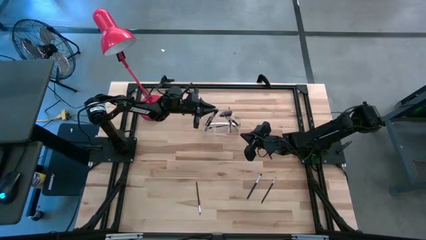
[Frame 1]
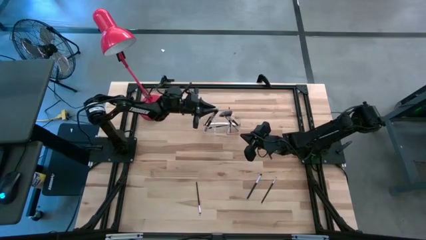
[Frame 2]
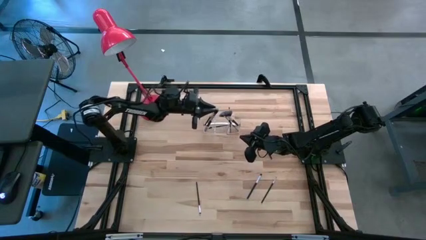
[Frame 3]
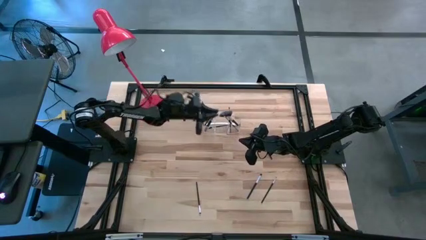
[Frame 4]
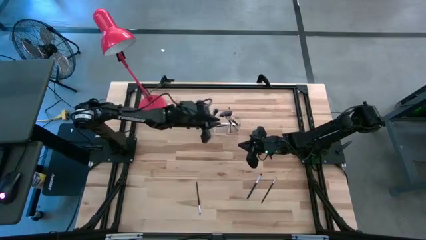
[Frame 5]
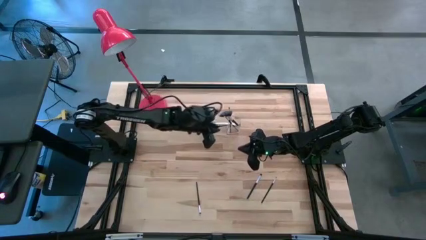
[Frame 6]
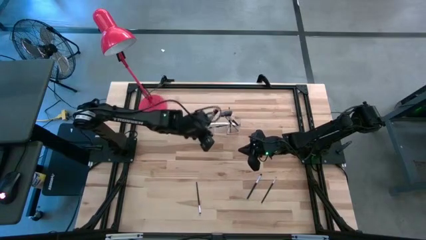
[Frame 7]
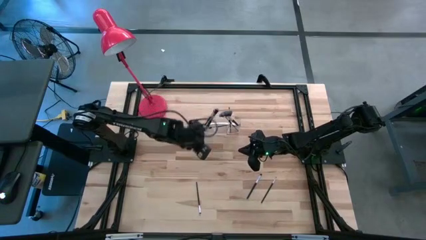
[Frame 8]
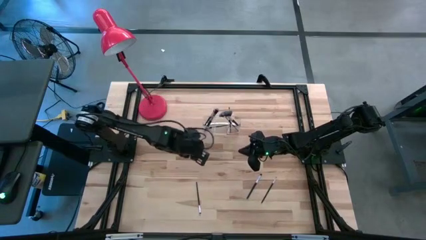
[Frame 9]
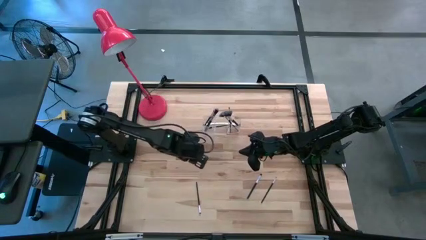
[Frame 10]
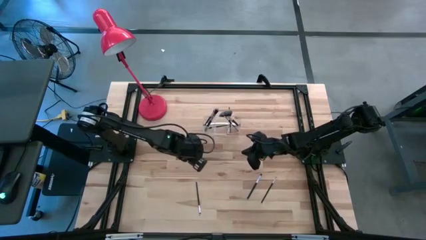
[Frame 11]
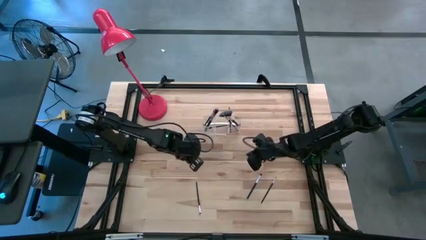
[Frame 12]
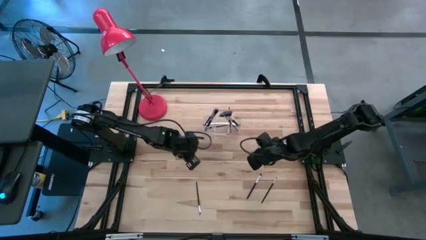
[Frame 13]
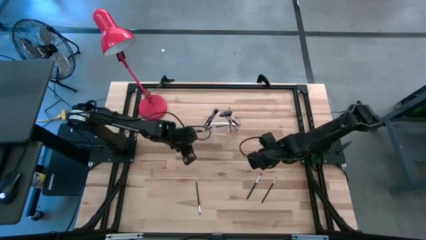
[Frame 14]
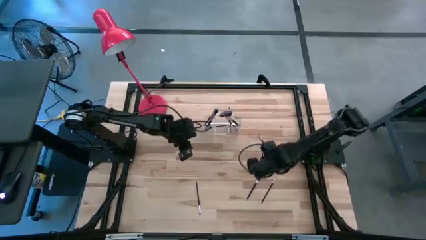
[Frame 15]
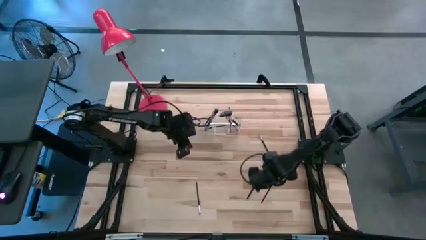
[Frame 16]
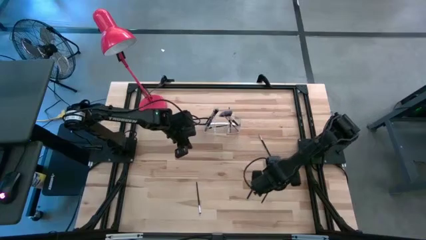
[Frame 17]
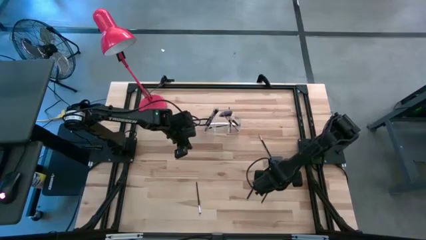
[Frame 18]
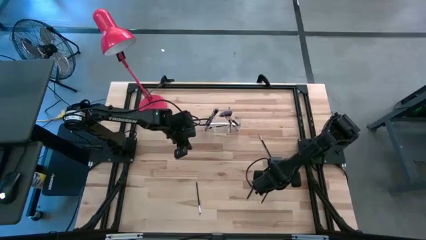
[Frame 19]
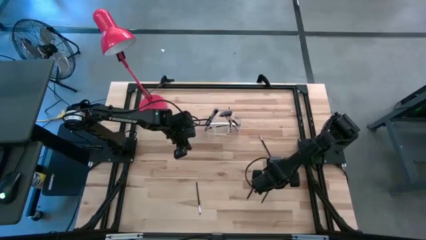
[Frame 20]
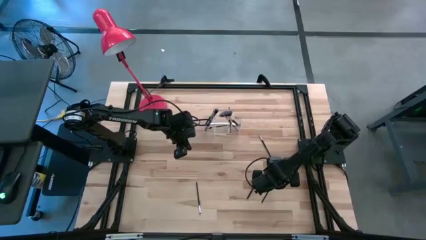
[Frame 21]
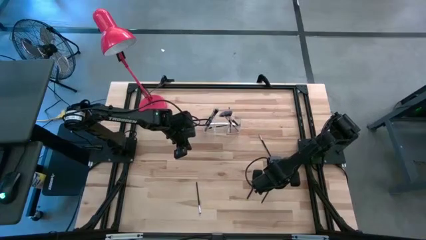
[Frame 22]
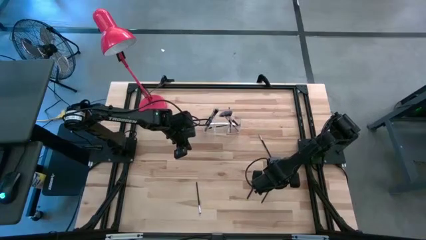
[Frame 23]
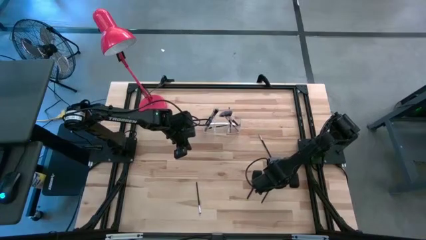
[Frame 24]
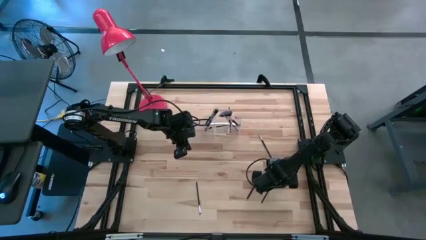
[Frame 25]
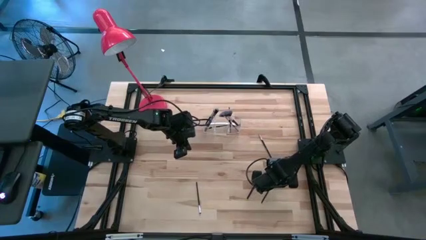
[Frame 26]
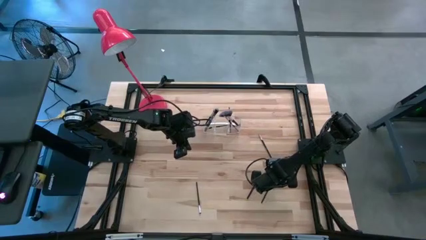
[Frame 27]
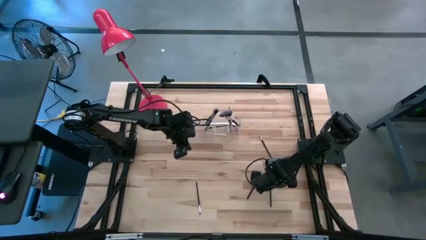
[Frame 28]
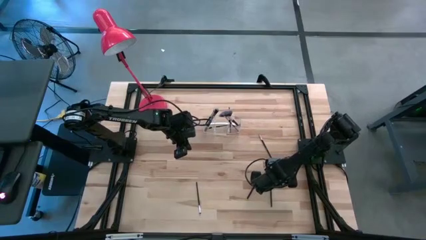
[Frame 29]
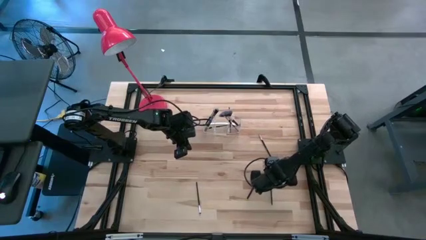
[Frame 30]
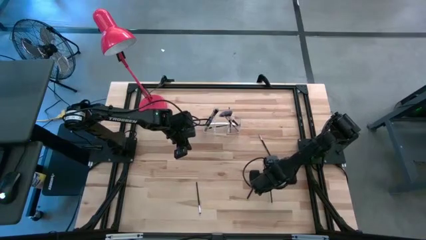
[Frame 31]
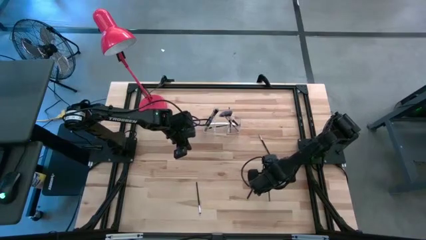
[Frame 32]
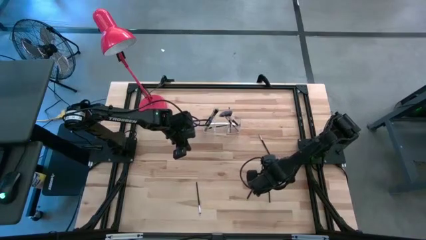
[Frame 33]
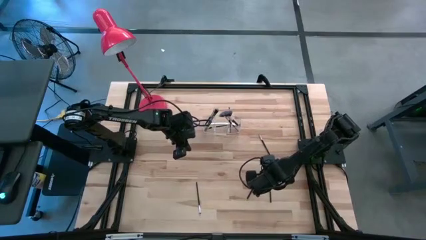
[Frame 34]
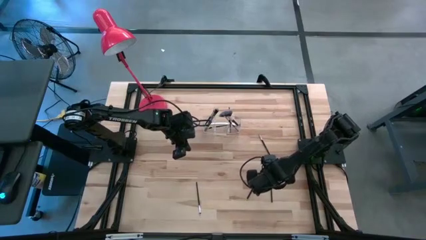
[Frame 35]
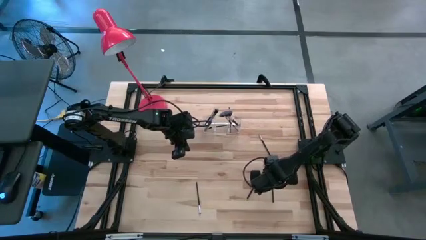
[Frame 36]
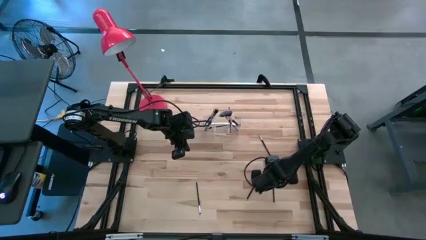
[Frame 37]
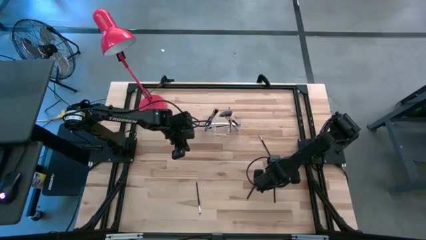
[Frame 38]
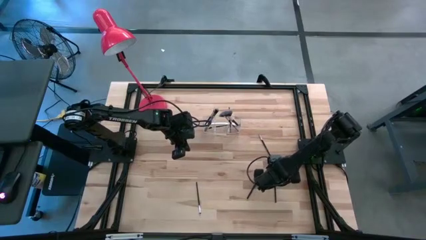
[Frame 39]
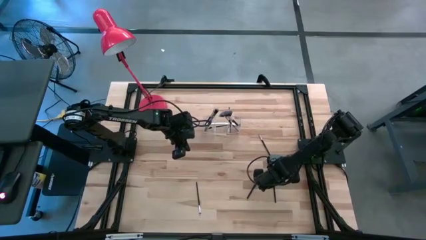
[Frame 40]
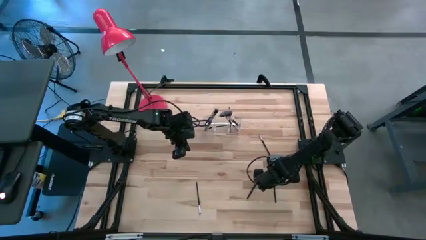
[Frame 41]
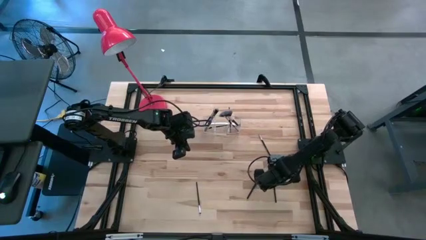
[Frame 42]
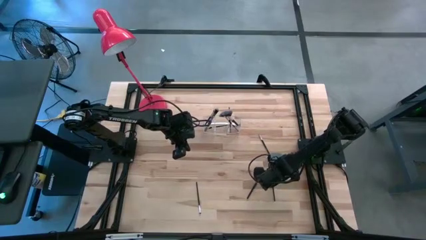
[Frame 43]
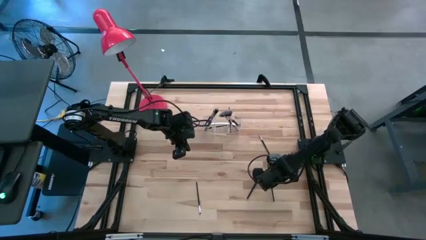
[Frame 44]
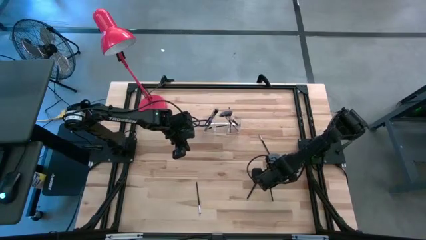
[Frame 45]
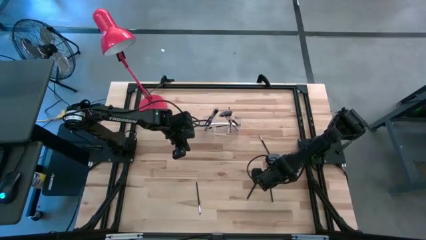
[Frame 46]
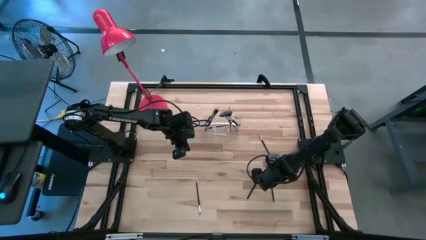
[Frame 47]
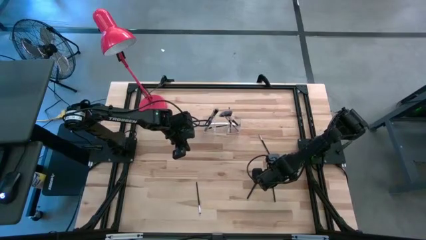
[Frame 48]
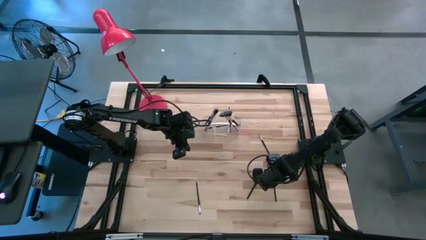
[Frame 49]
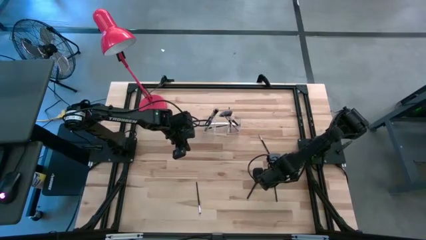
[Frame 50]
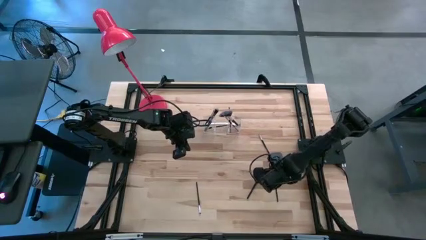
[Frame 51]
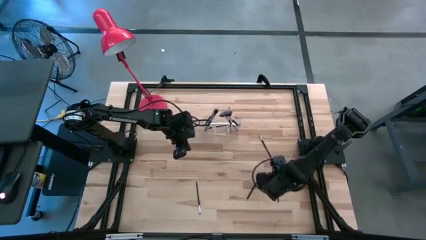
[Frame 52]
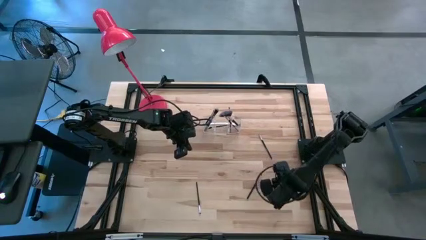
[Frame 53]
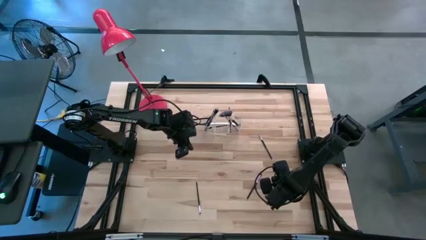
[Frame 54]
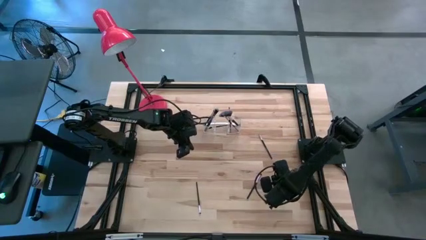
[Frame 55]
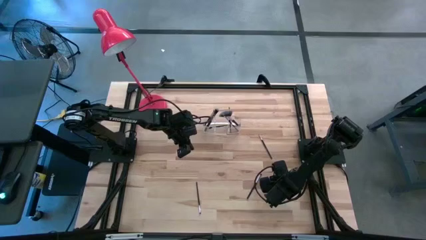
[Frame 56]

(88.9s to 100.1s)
Task: Pick & Place Makeup Supplies
Put the makeup brush into the transparent organizer

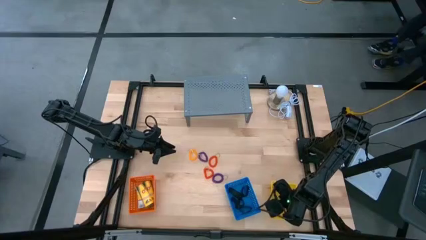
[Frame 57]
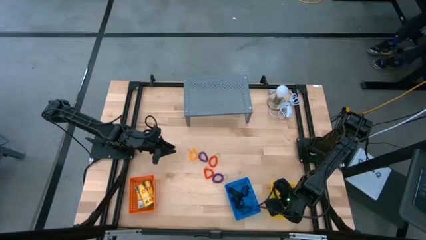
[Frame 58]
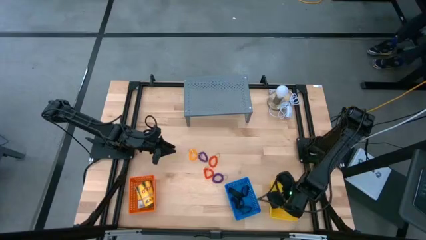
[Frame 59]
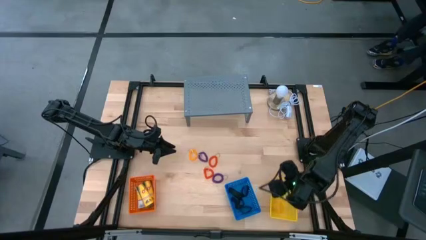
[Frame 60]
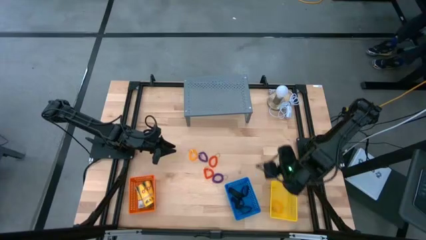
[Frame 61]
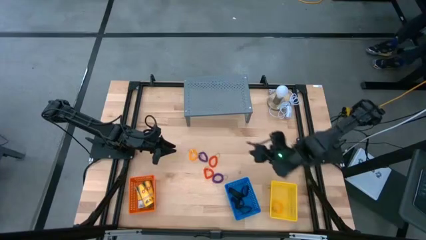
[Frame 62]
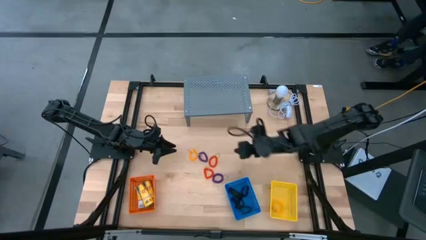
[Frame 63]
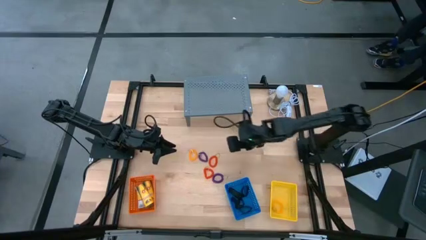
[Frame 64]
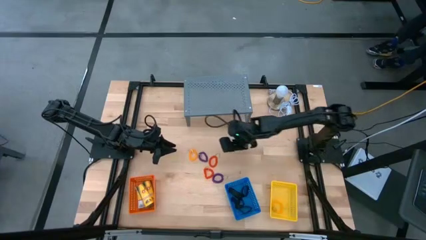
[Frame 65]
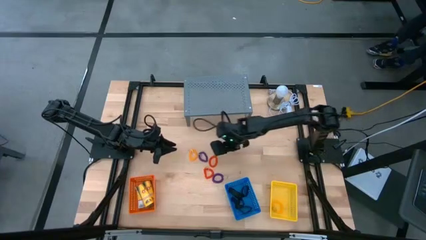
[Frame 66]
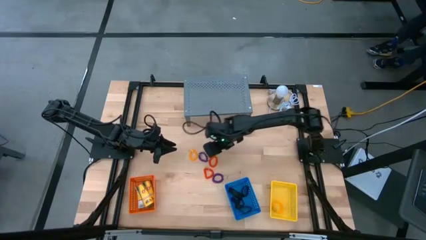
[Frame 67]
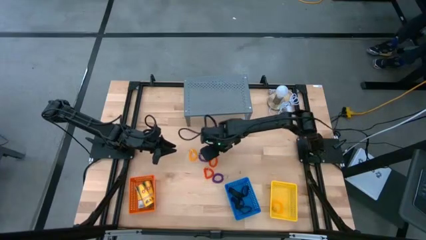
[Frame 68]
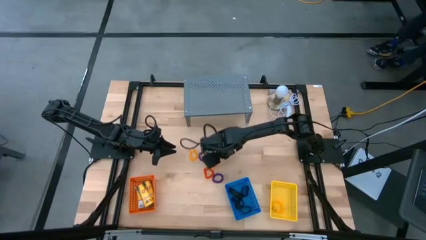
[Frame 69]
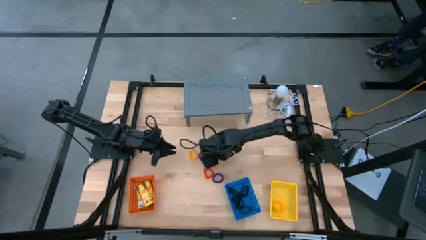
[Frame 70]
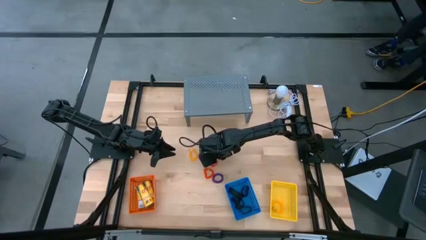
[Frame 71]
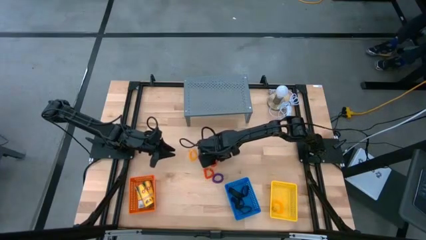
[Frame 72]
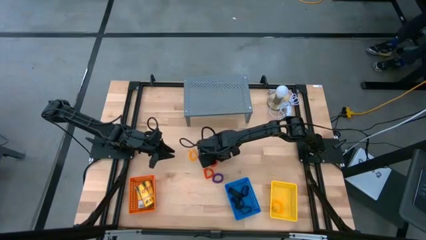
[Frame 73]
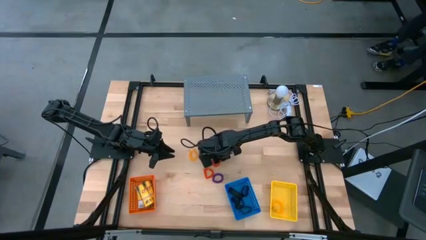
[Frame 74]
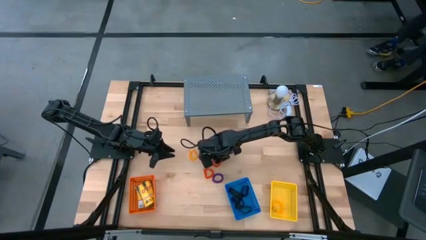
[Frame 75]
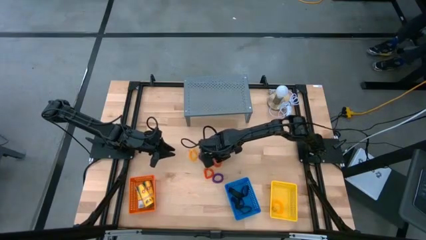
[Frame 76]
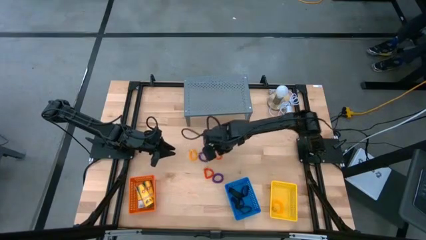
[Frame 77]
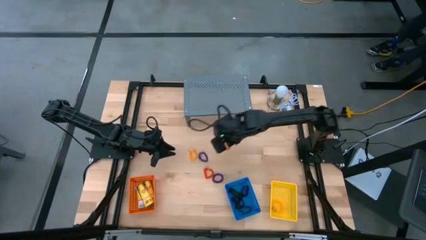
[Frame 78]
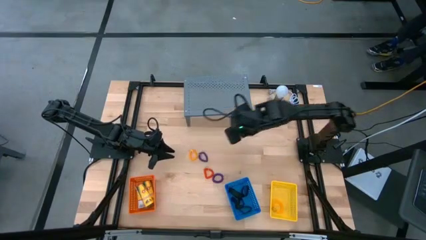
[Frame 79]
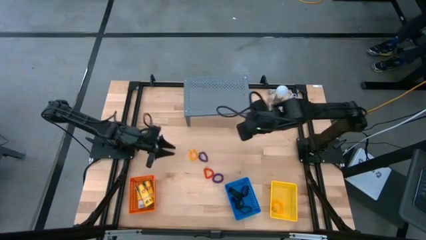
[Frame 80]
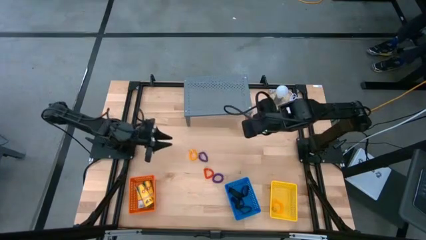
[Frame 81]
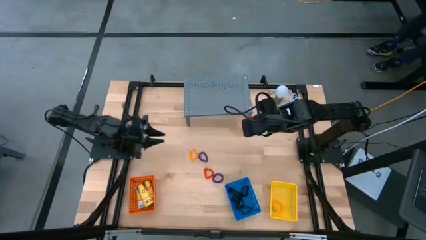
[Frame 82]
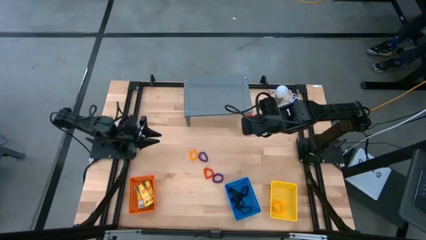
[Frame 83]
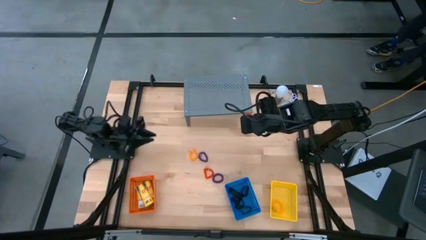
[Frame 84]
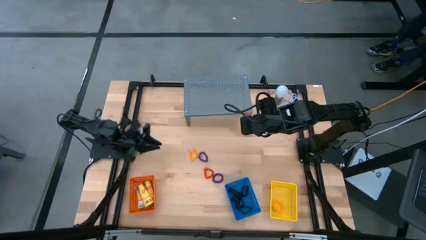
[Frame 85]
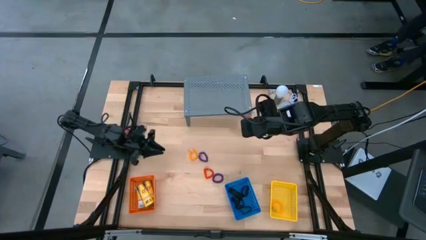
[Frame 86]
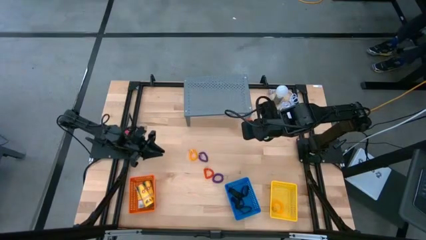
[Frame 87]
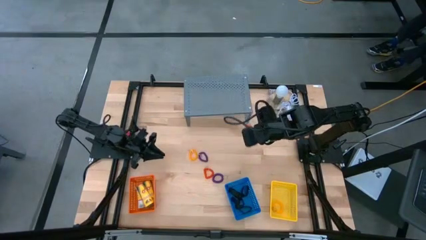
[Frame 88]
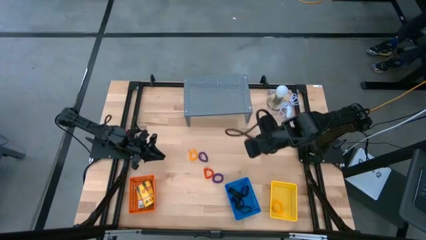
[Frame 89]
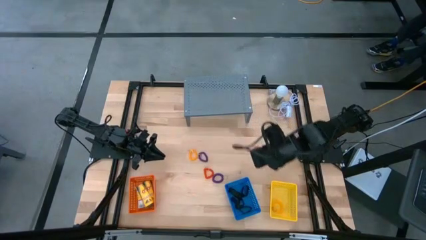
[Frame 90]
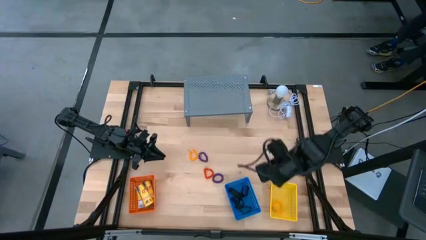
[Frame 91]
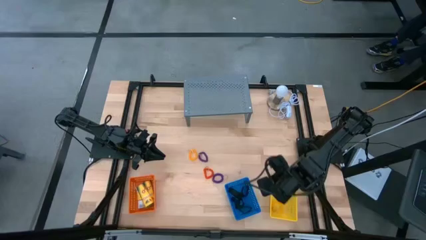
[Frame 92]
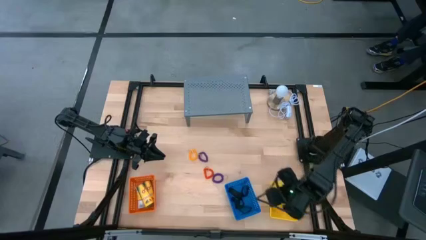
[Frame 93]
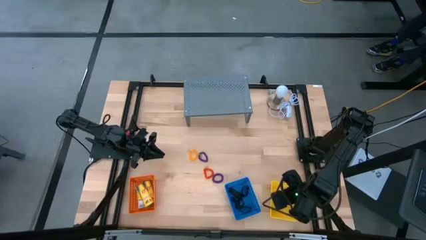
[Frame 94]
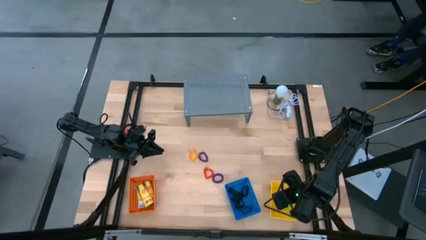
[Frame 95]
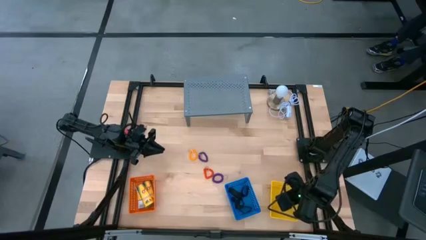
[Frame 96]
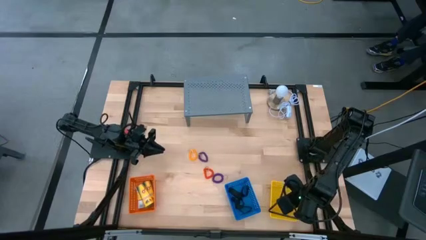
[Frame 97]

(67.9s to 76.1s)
Task: Pick & Place Office Desk Supplies
Put the orange spring keychain into the yellow bin
